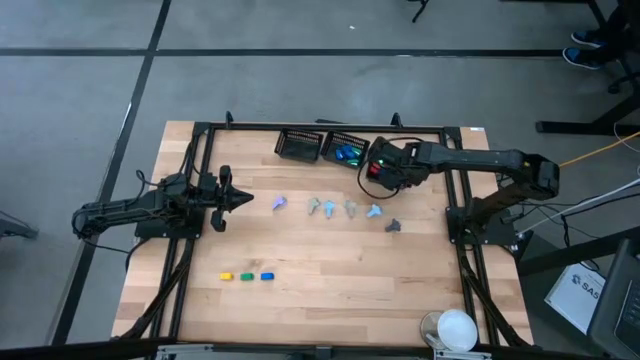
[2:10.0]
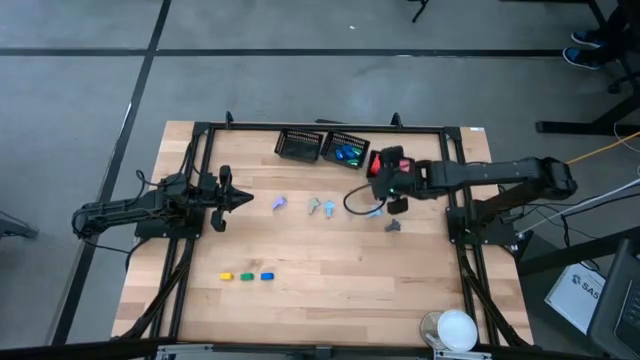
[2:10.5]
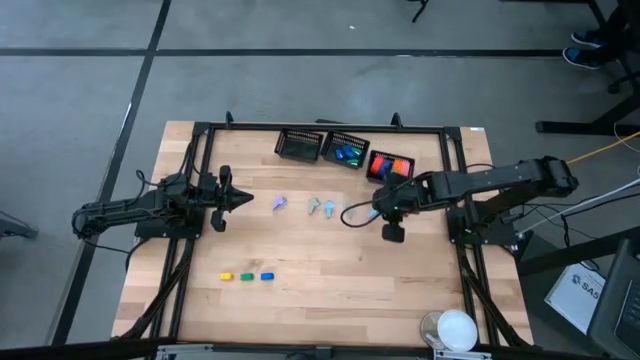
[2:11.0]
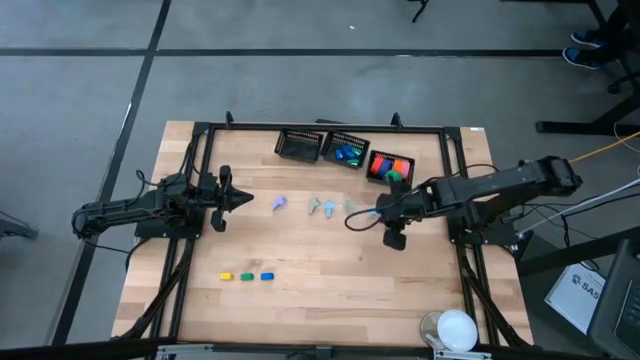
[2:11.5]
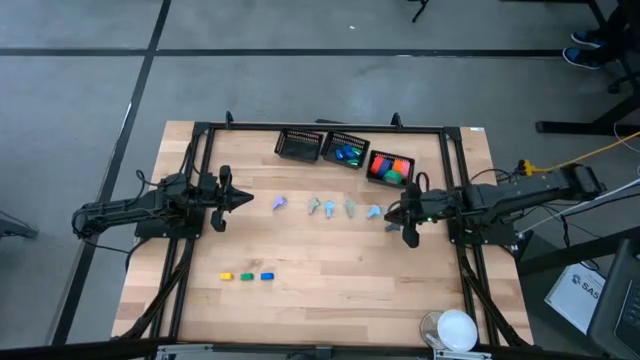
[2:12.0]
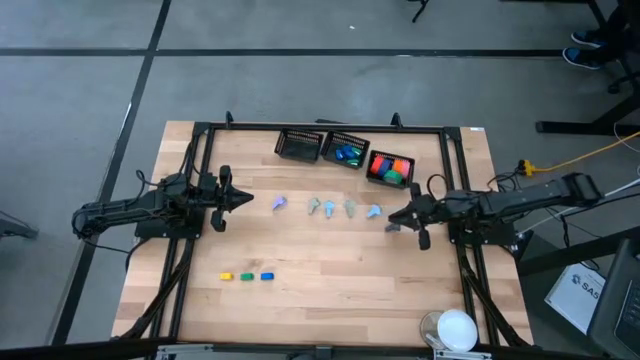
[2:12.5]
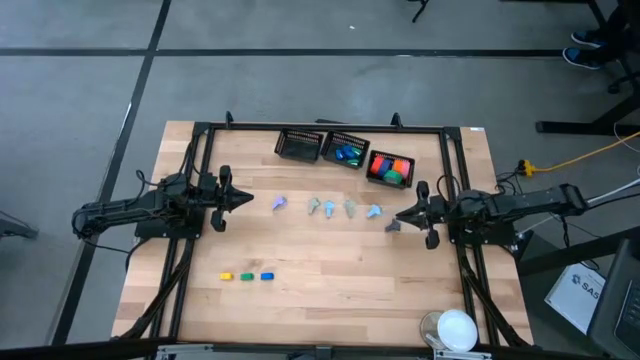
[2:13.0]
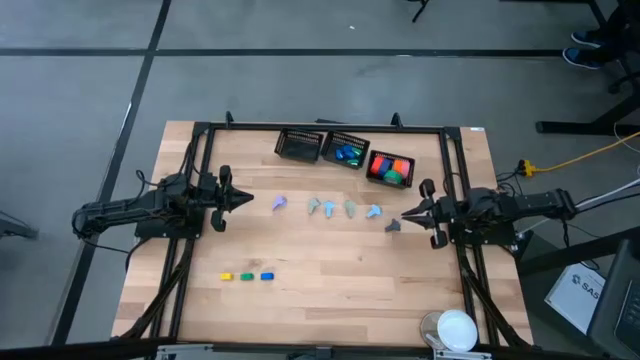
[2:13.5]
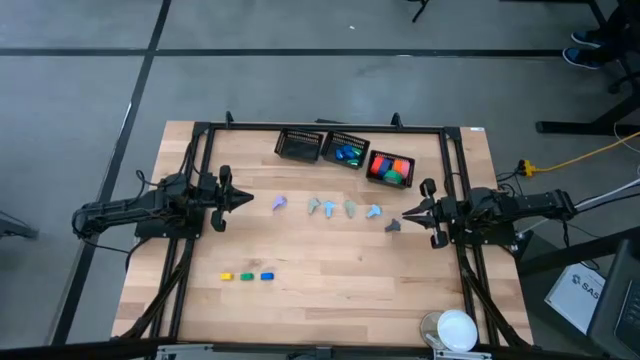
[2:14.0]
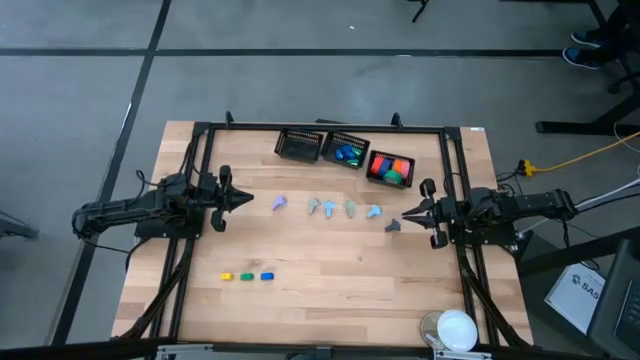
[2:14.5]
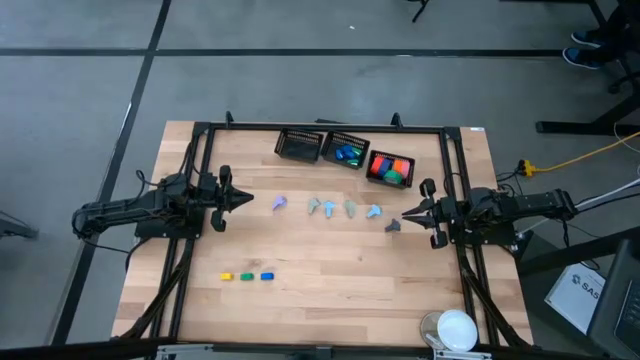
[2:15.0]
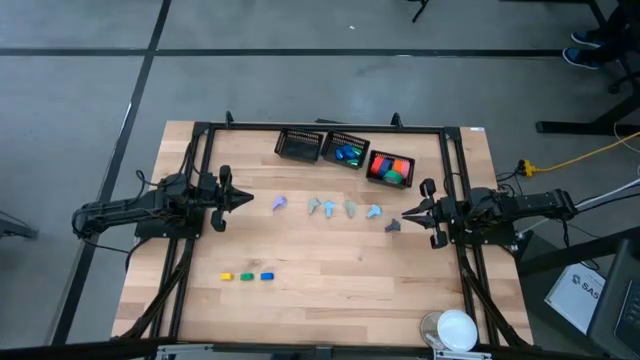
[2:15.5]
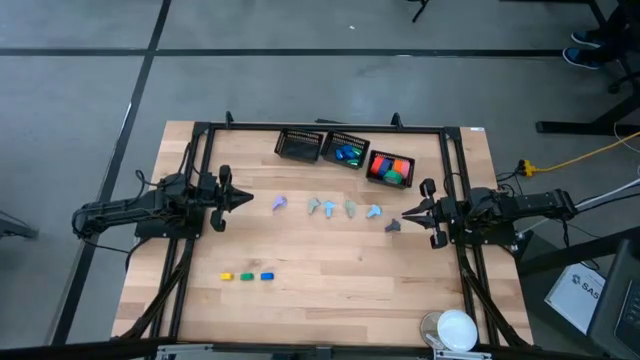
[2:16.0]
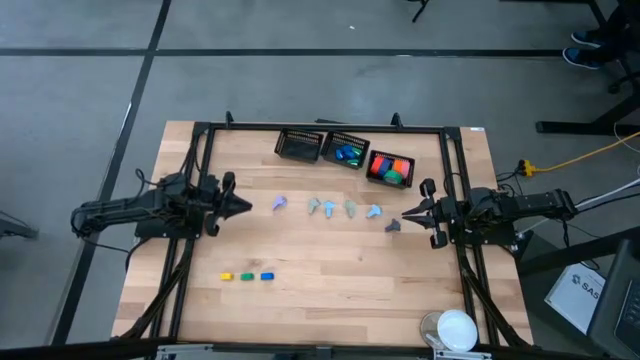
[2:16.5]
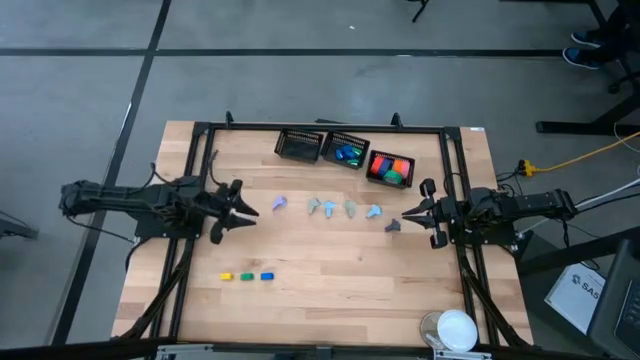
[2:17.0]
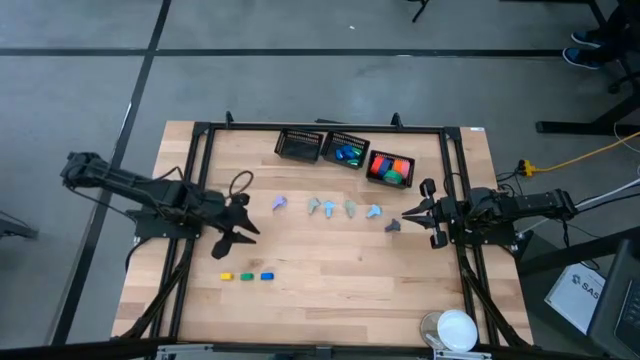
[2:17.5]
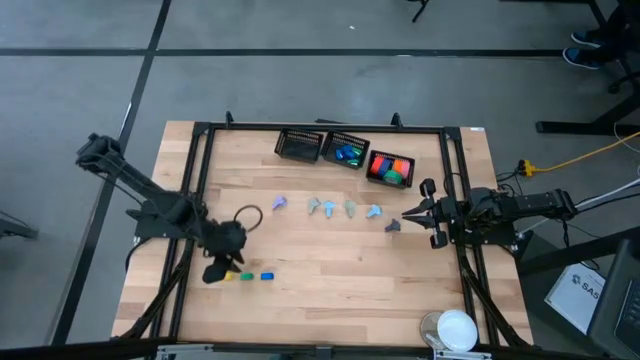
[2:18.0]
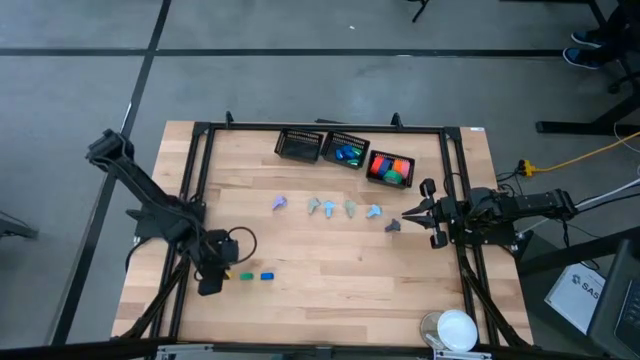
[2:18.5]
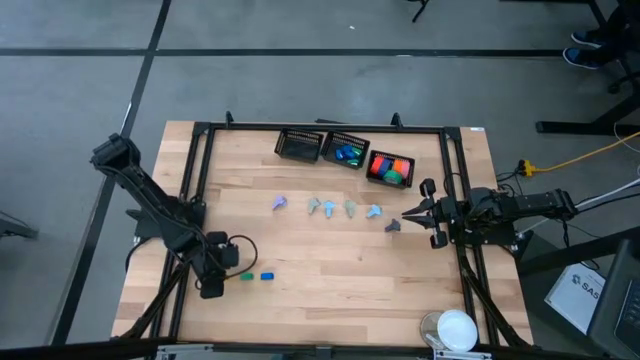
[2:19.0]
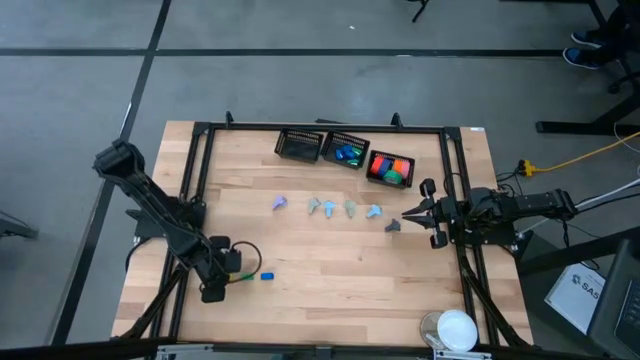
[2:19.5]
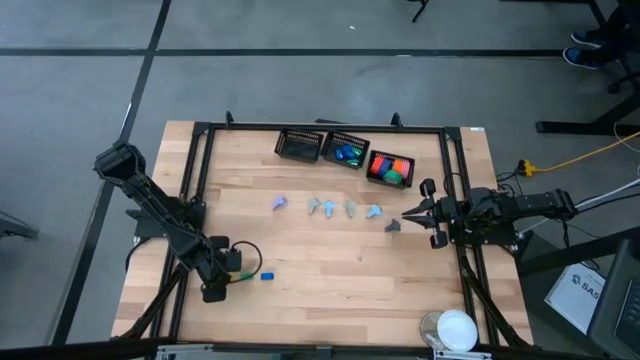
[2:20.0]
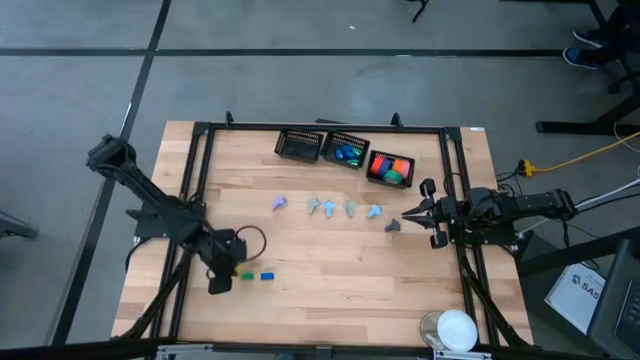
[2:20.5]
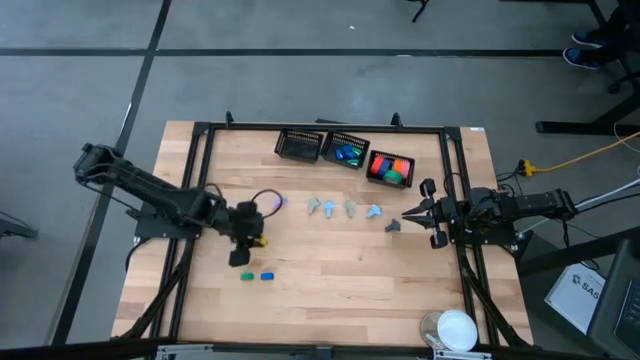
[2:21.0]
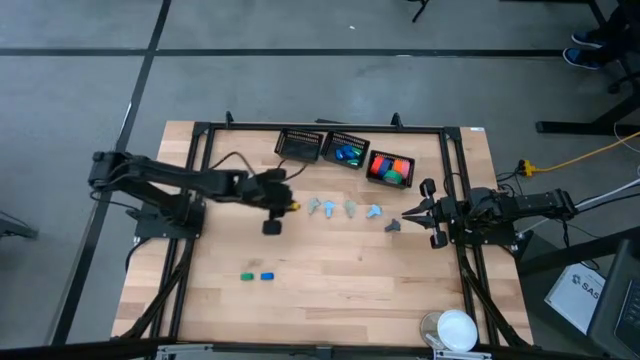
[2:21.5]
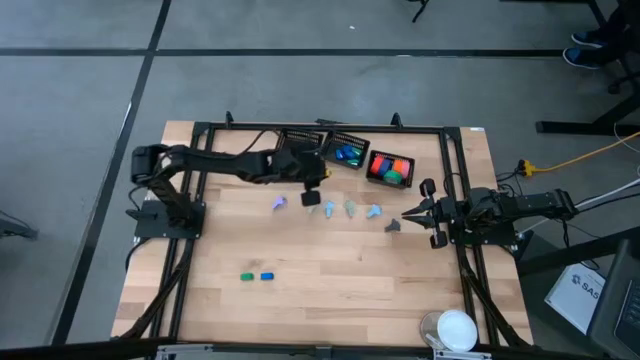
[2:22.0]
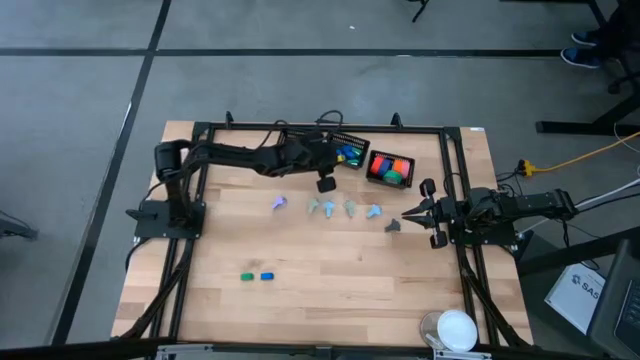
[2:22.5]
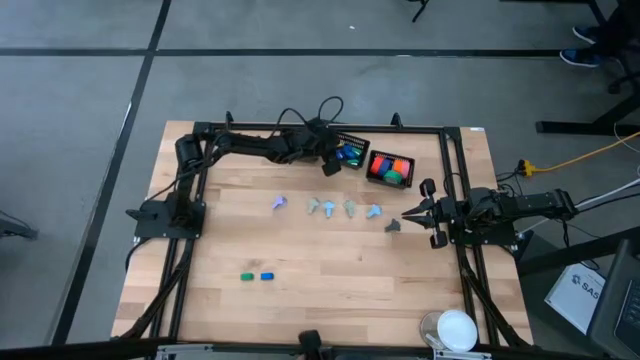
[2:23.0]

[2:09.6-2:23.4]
Task: Pick and place Stapler, Stapler remover, tape
Put the yellow stapler into the middle black bin

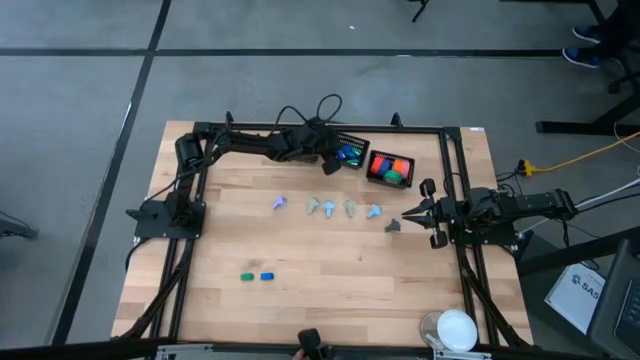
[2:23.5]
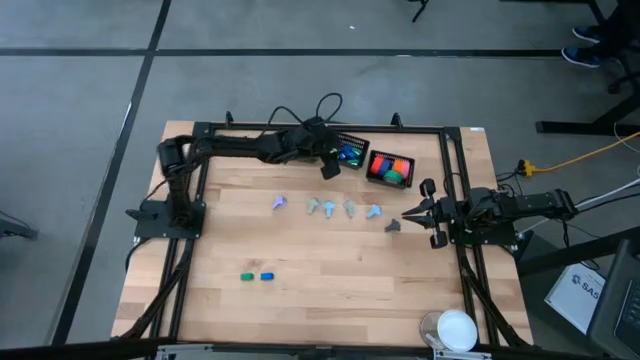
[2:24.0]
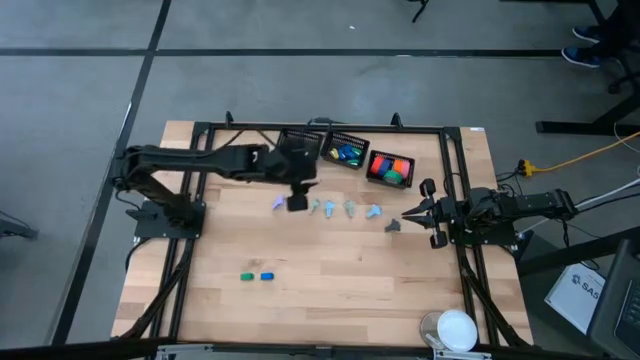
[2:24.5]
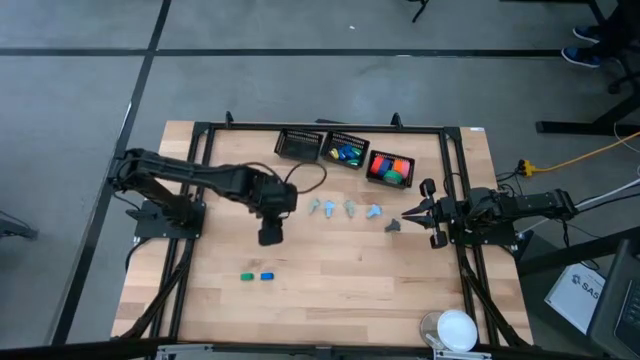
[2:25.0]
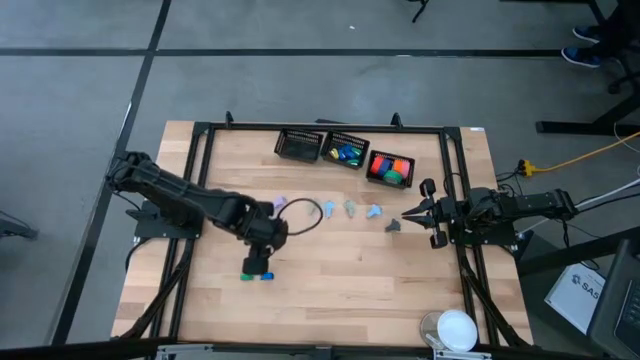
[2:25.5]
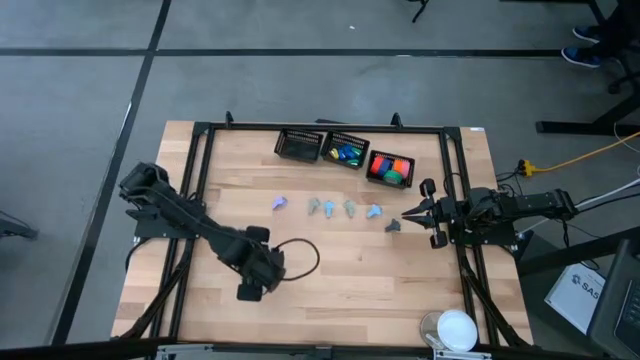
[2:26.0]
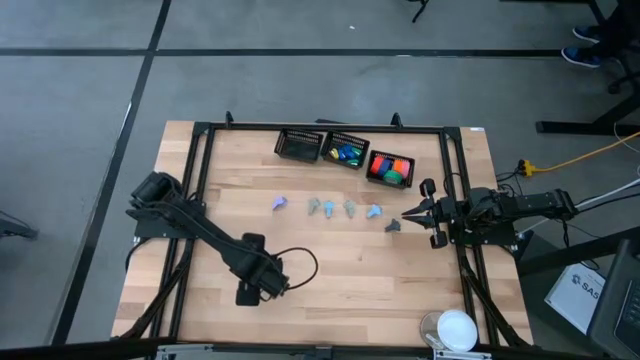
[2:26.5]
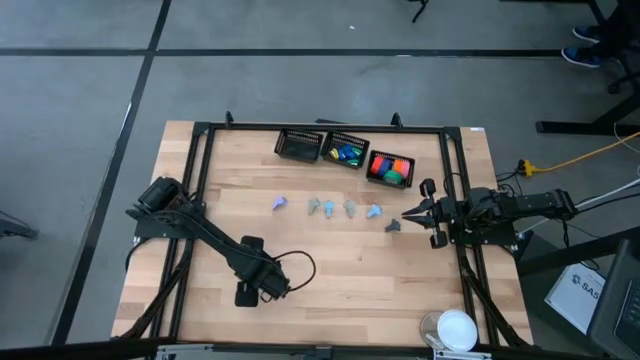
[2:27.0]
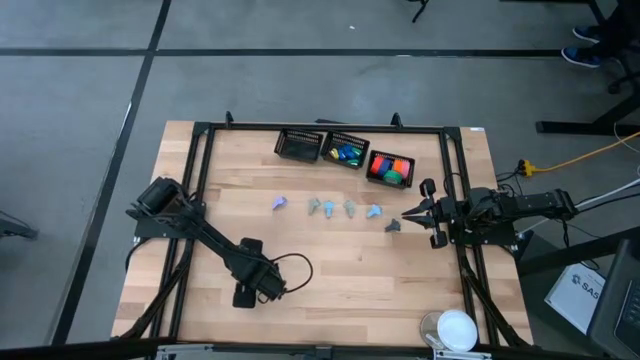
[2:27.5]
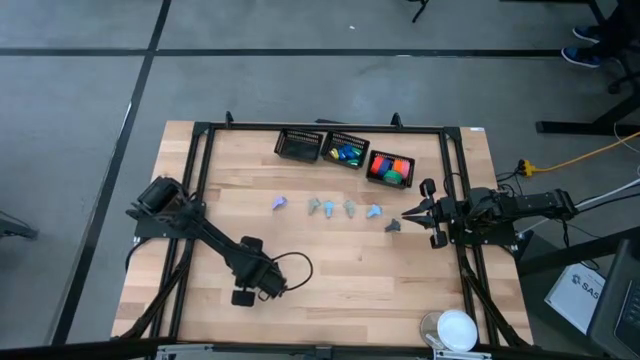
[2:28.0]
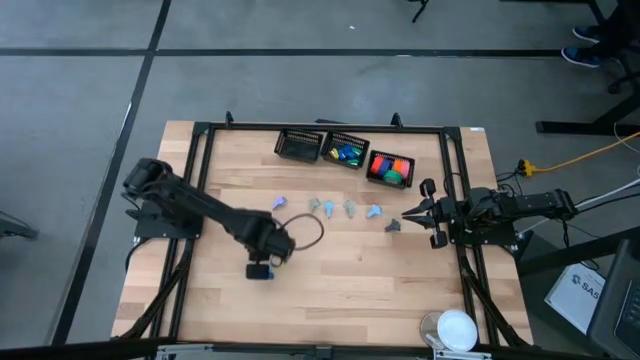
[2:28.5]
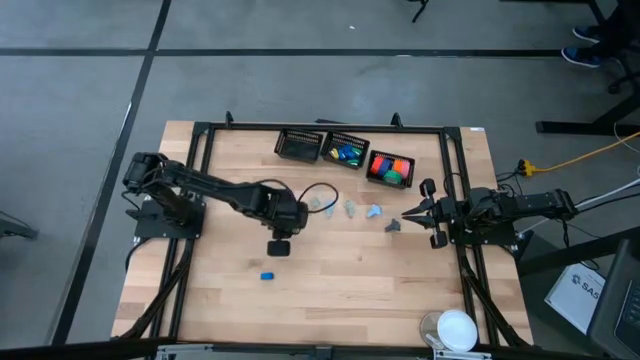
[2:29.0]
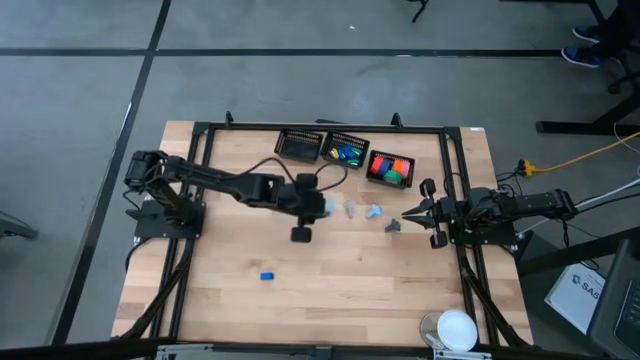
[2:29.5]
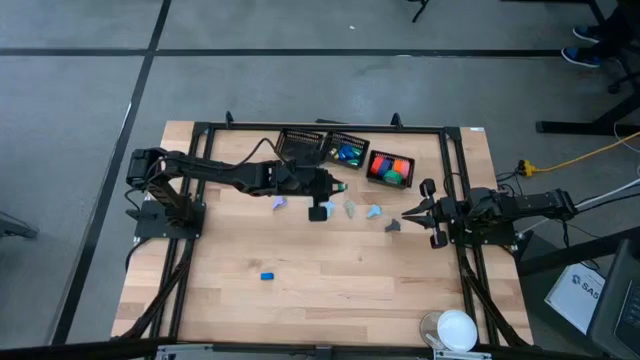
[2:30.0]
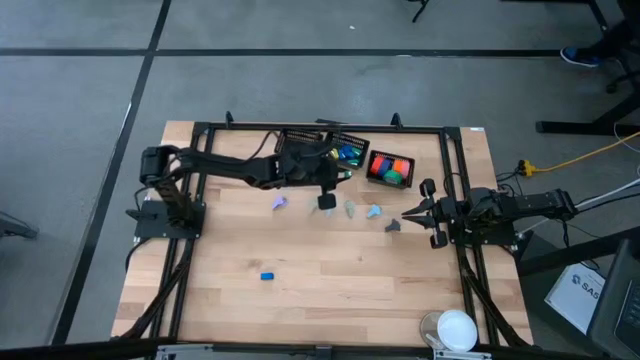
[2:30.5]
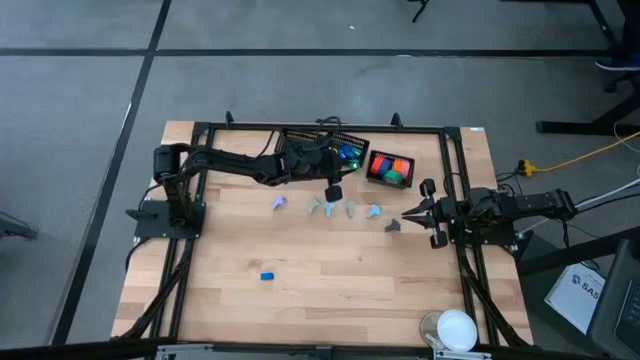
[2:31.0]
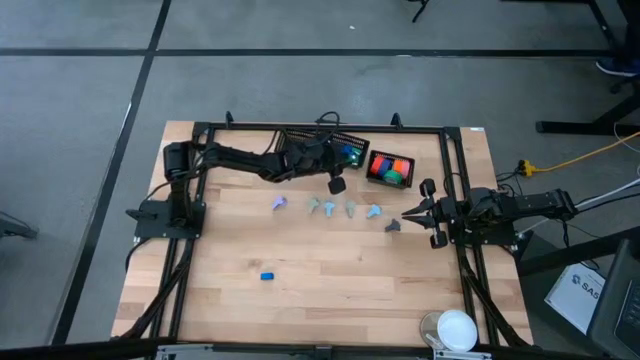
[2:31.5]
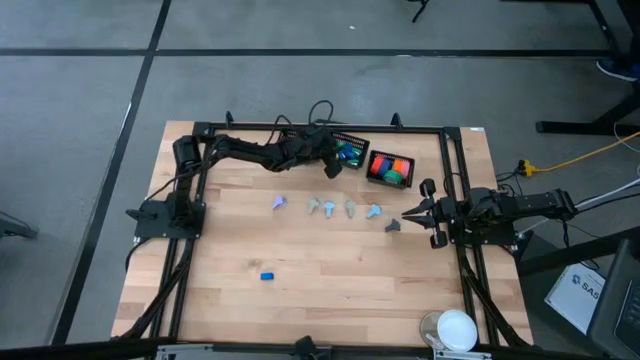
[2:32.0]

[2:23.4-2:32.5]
Put the green stapler into the middle black bin
